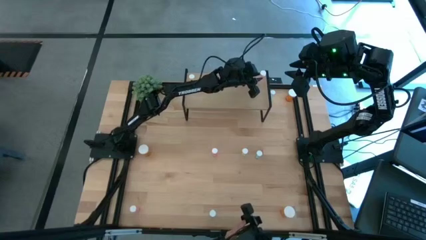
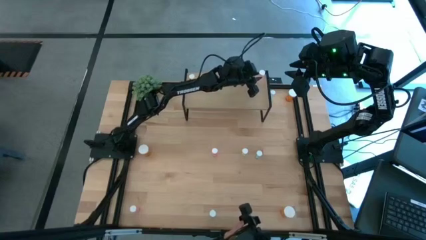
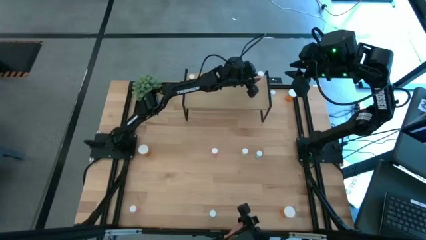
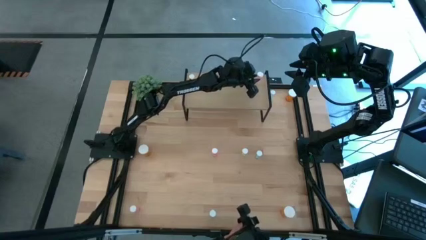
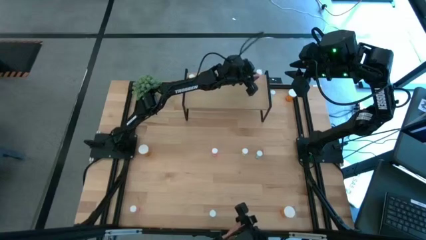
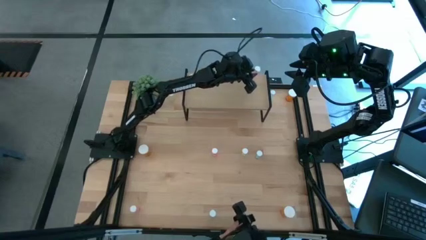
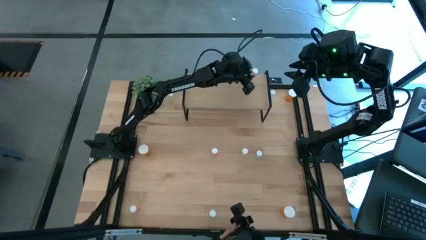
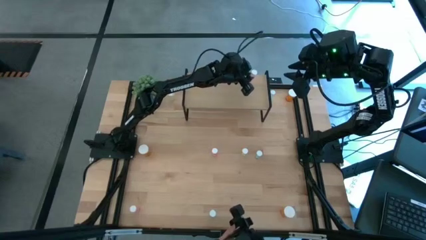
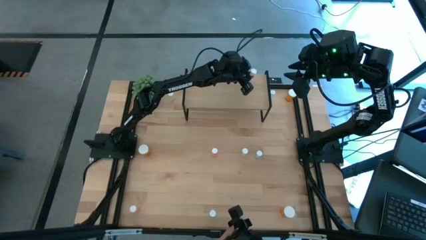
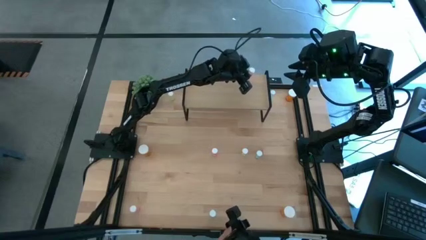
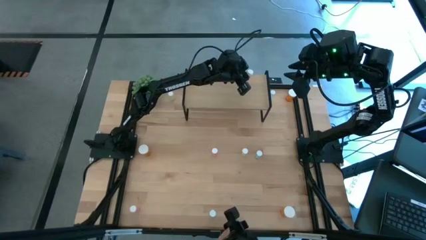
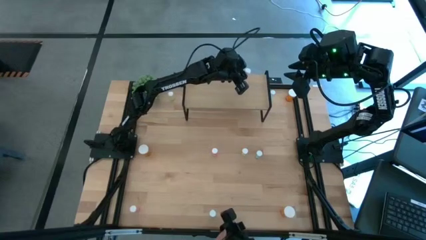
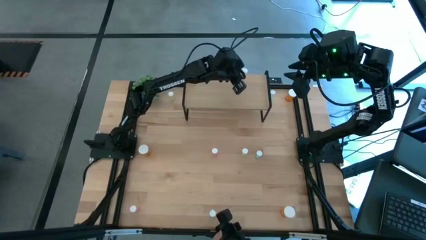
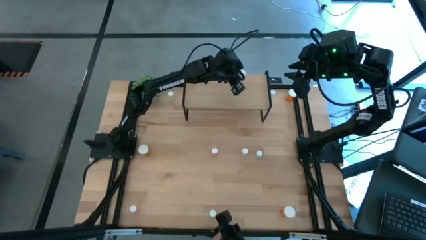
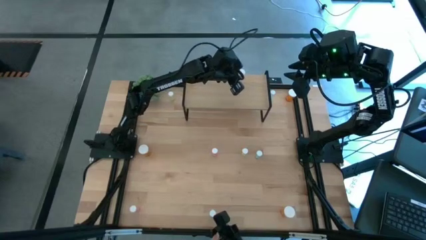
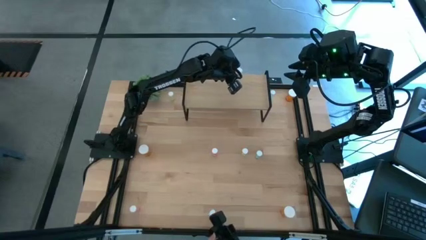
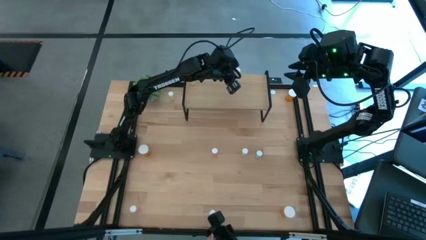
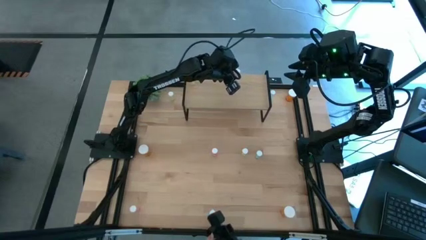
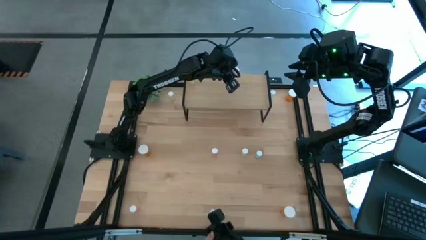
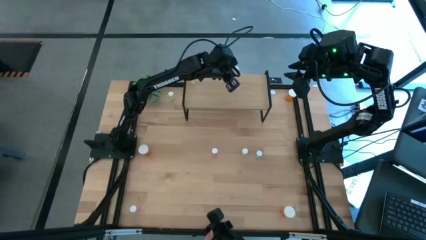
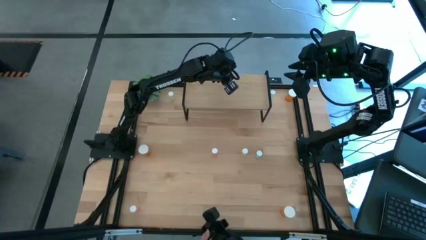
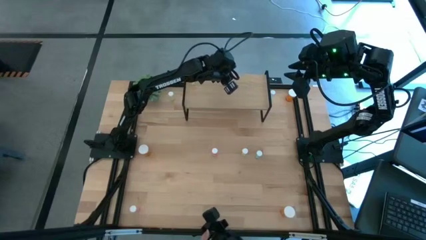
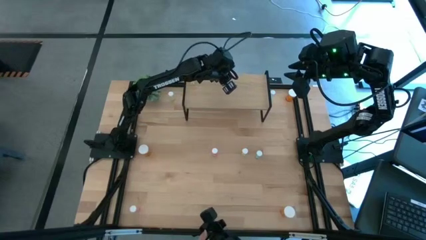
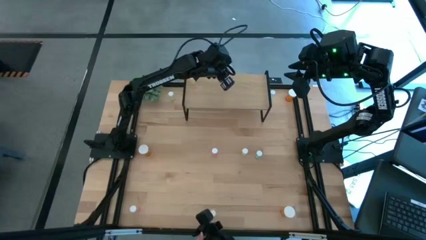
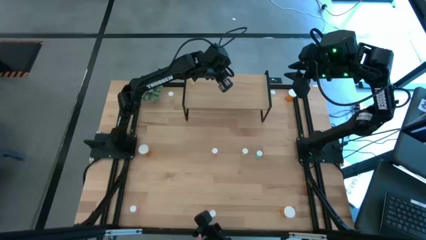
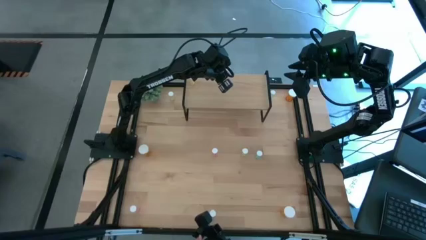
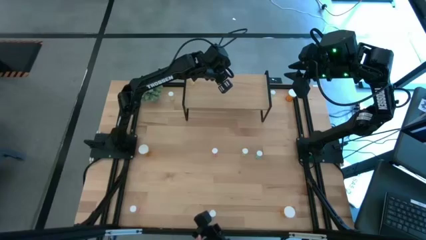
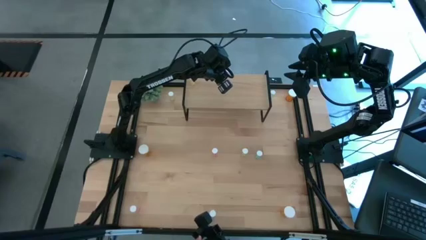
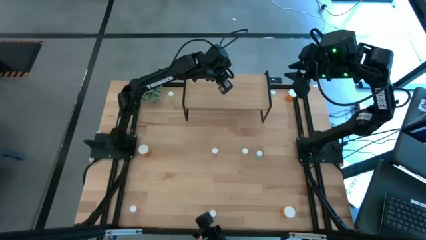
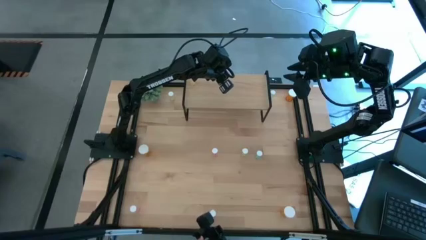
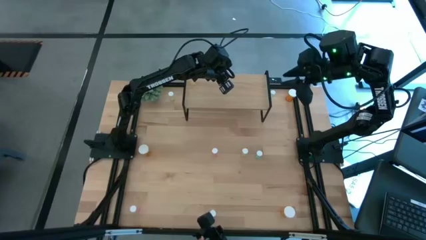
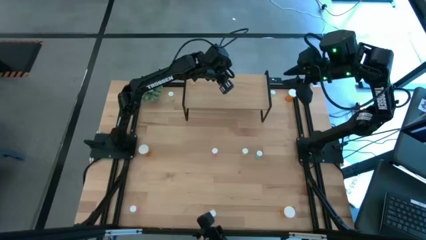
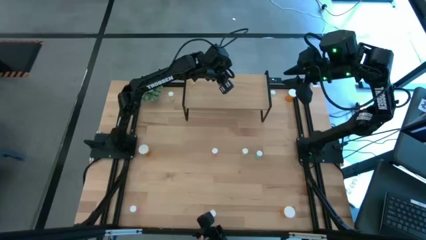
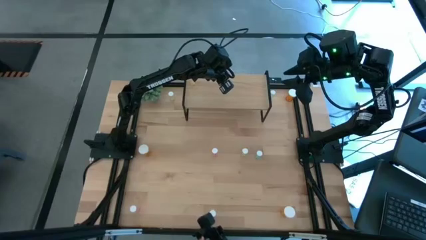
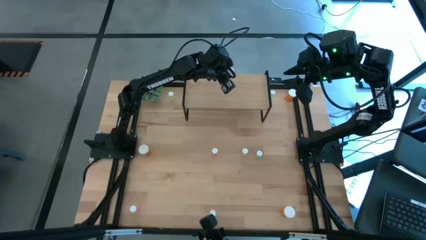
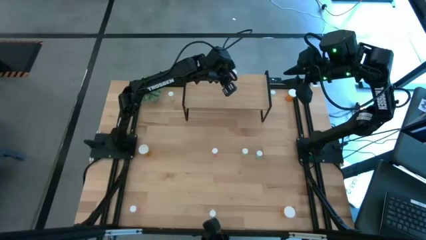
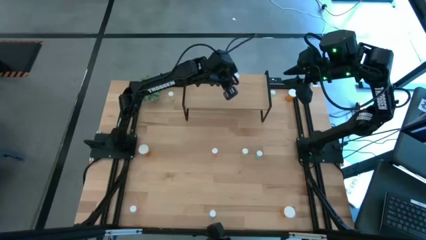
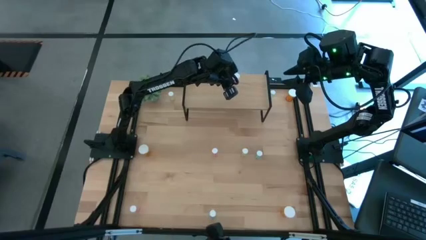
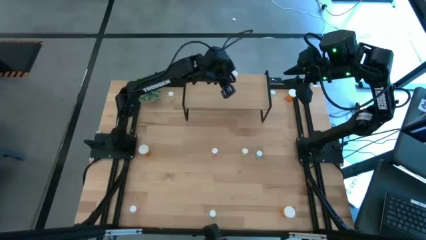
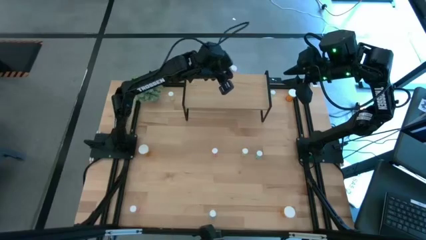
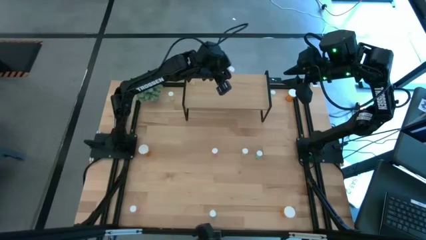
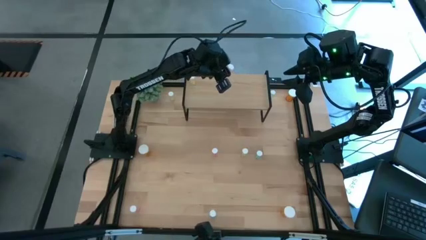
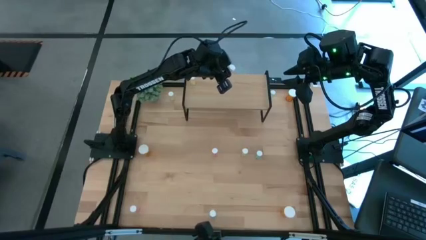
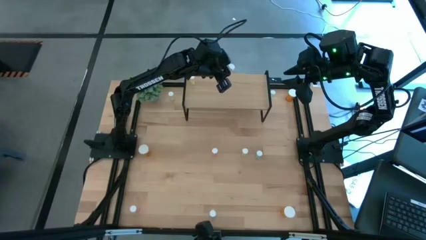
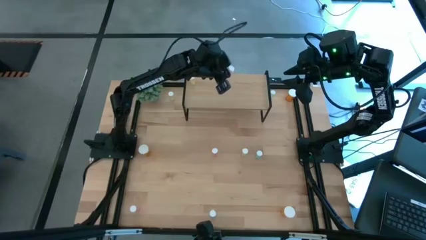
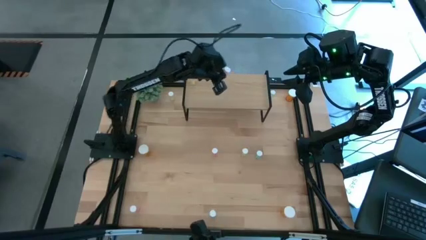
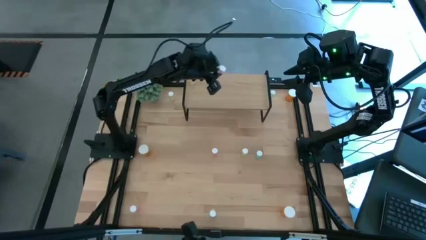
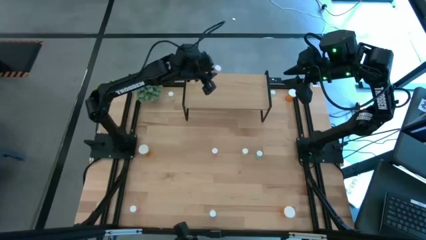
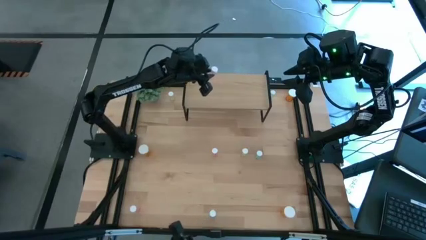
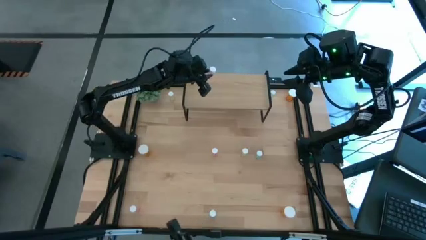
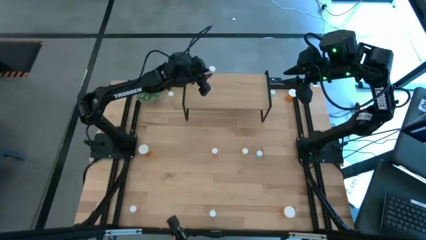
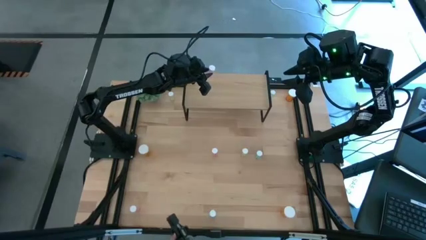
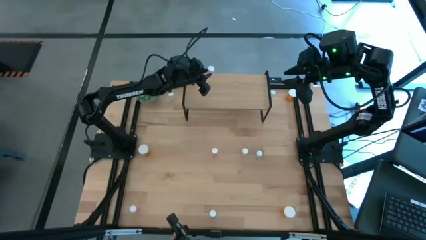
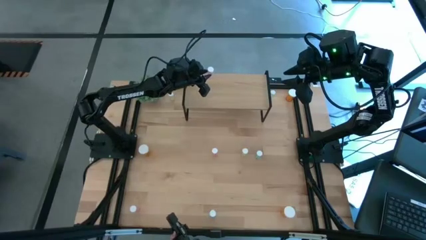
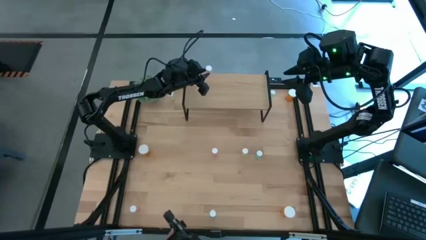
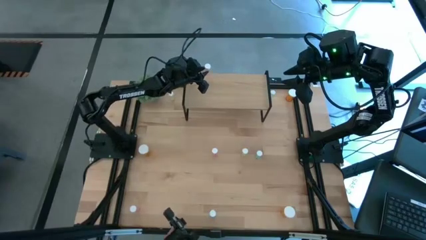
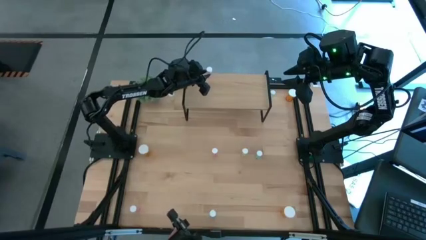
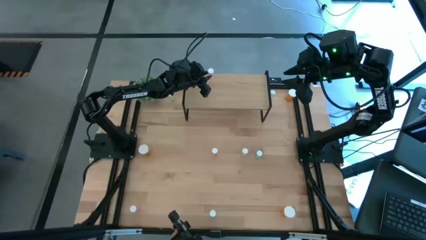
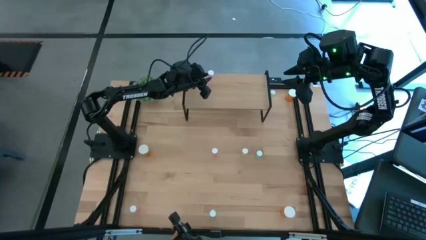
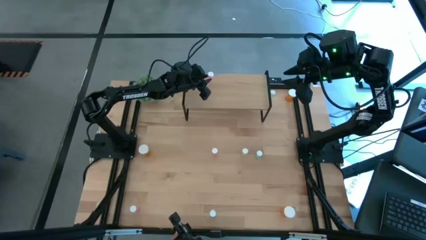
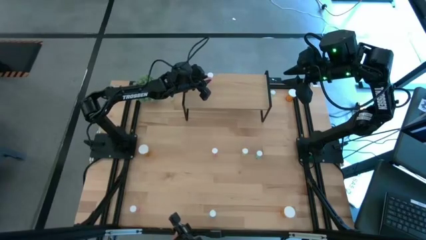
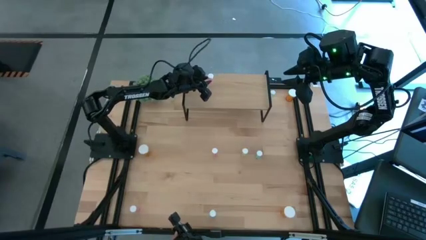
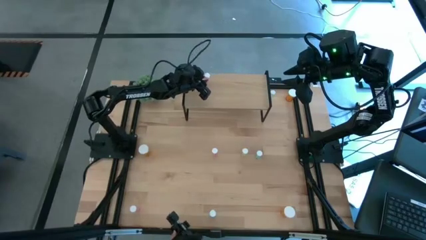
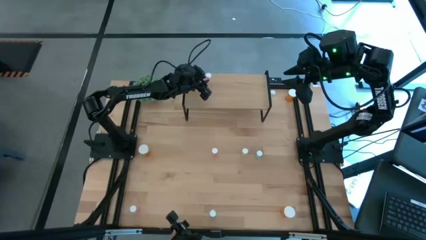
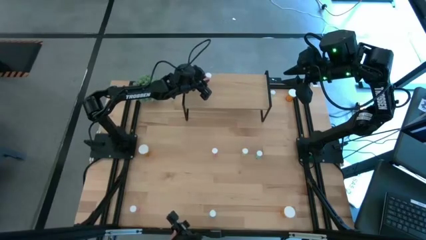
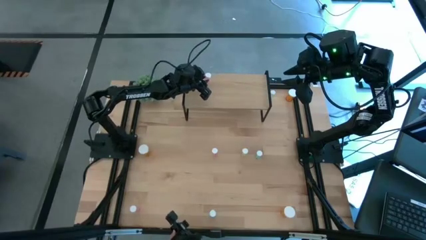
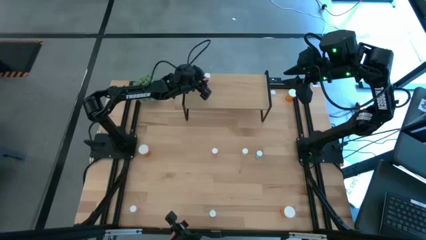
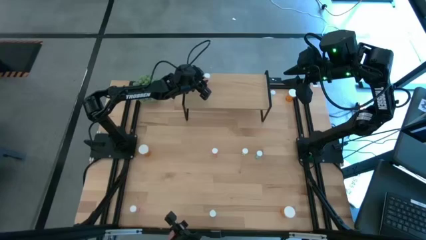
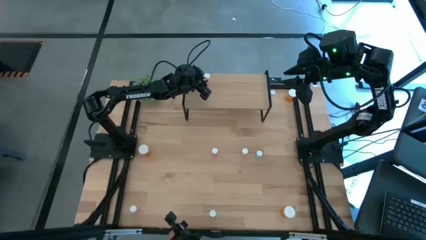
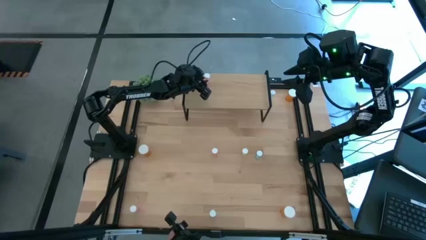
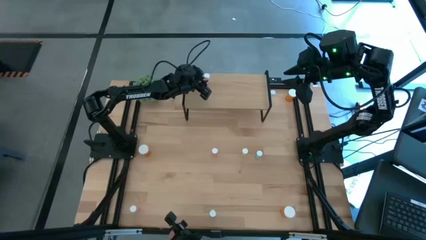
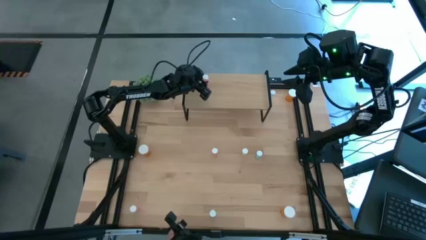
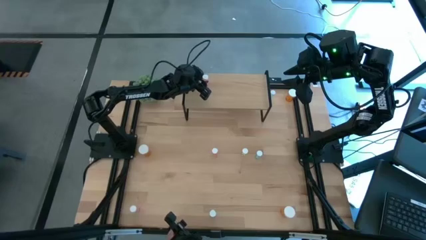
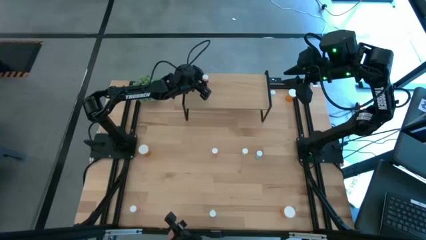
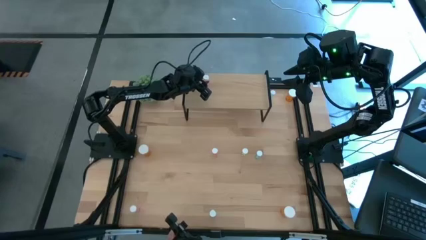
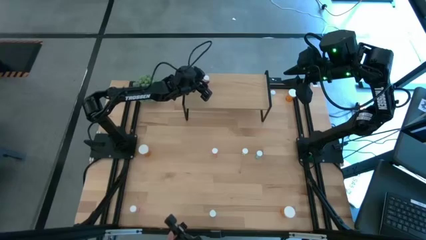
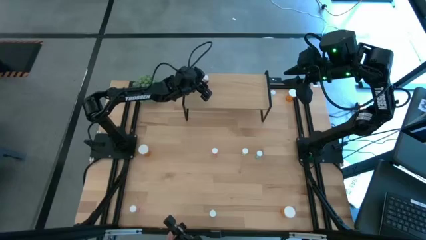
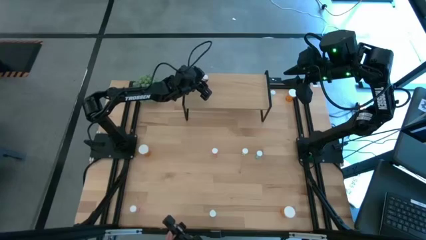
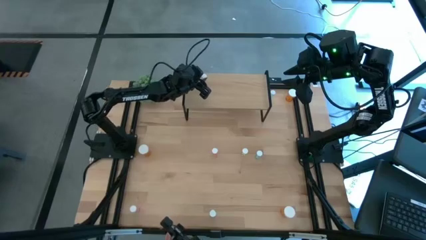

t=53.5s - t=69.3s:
Task: Pick and place medicine bottles onto shelf by color
Put the top right pink pill bottle on the shelf

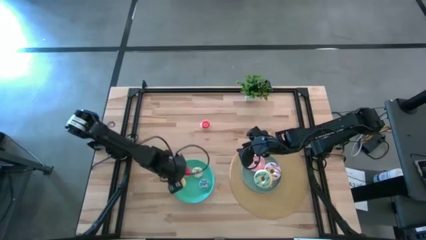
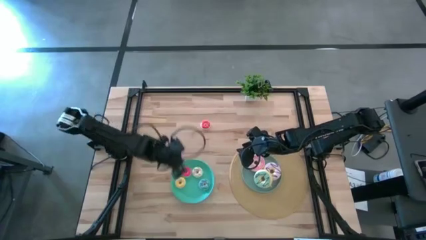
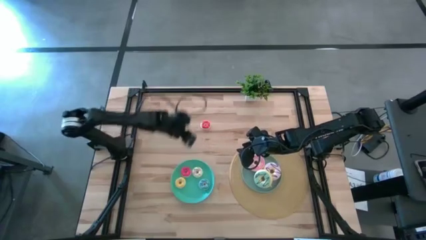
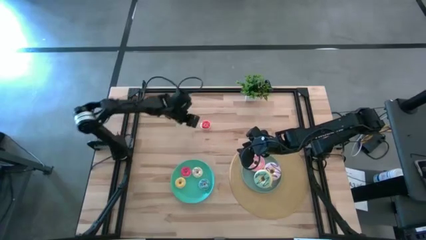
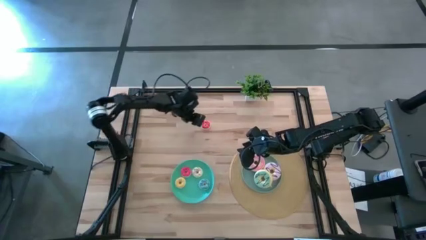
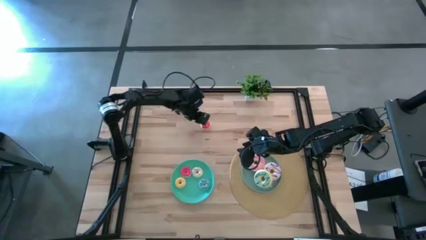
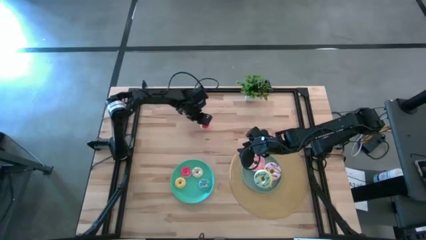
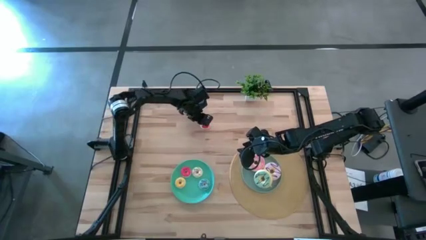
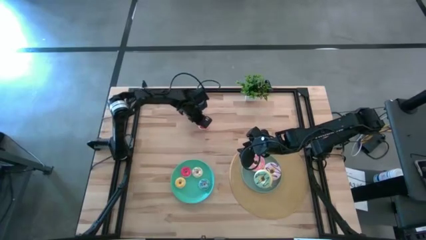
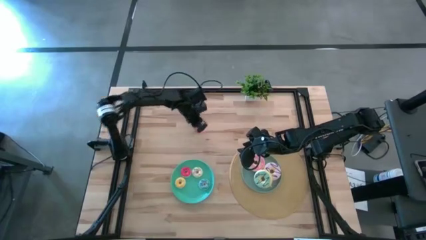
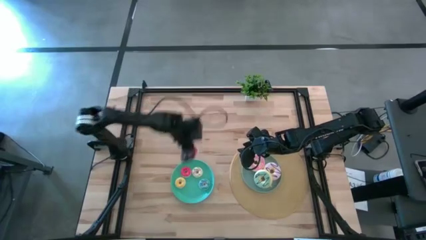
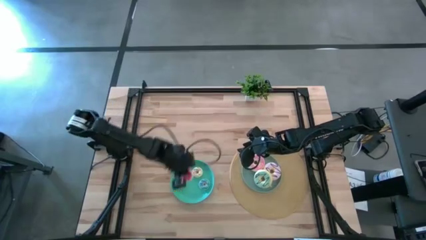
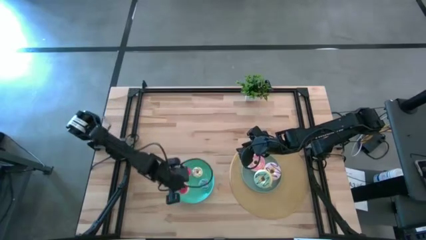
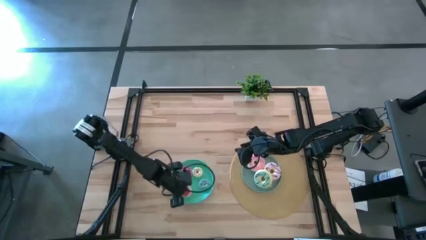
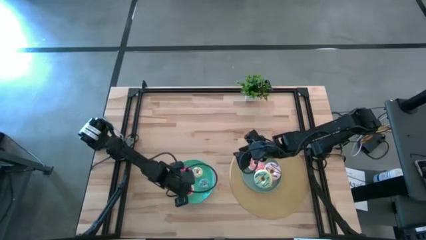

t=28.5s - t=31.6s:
Task: Pick & Place donuts
Put the small orange donut on the green plate
